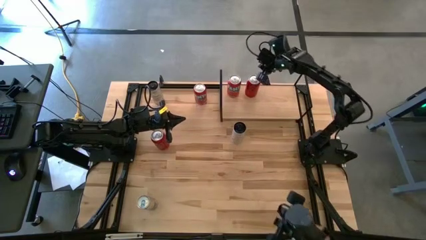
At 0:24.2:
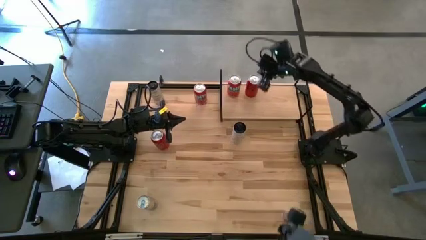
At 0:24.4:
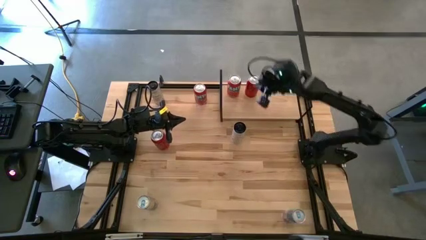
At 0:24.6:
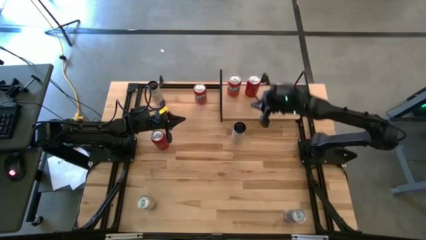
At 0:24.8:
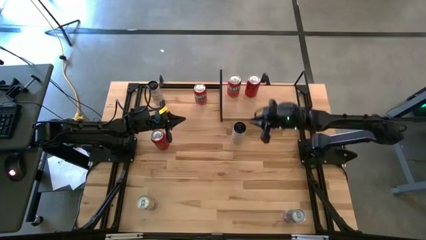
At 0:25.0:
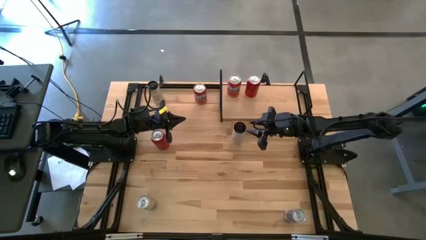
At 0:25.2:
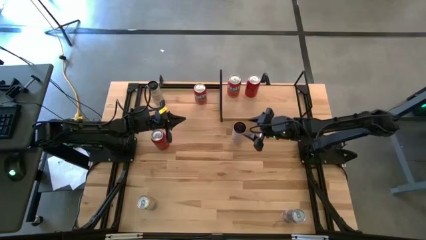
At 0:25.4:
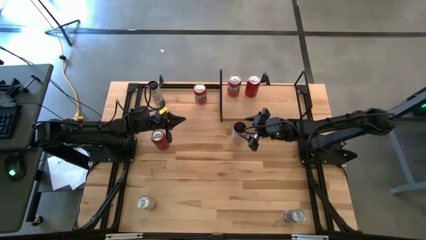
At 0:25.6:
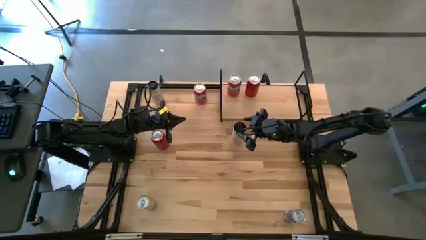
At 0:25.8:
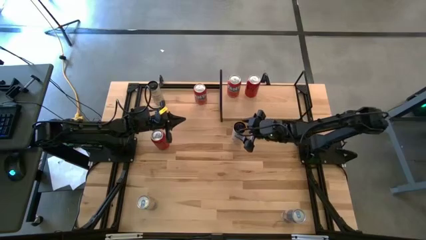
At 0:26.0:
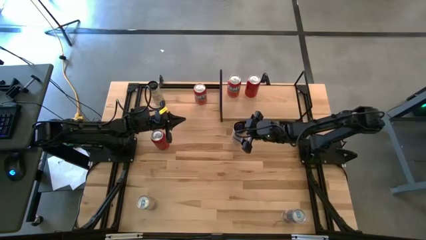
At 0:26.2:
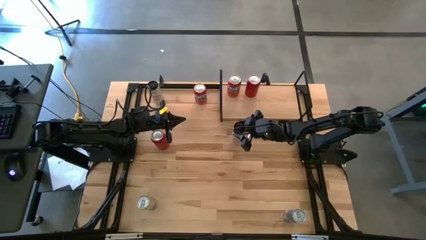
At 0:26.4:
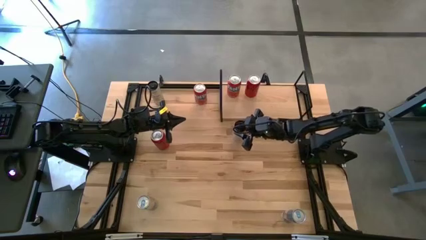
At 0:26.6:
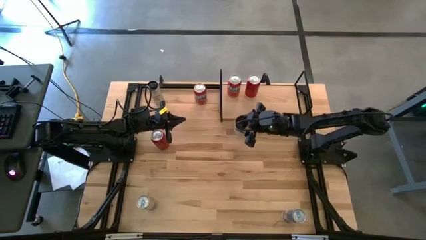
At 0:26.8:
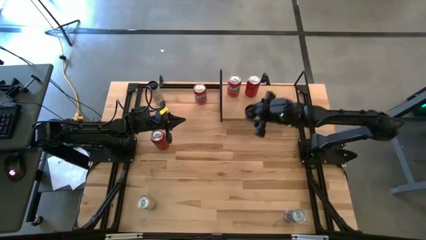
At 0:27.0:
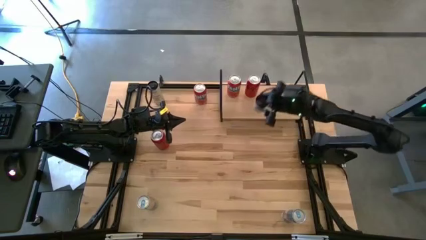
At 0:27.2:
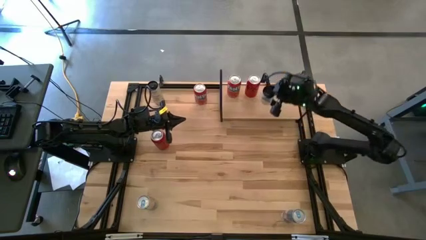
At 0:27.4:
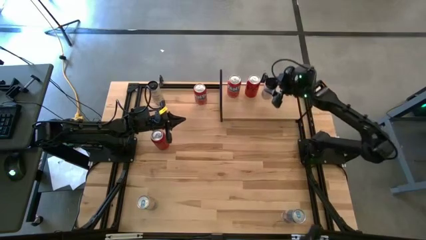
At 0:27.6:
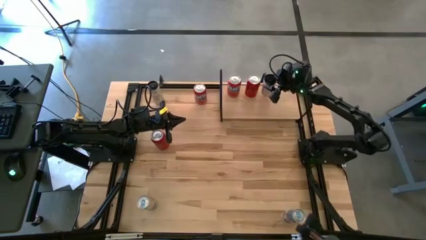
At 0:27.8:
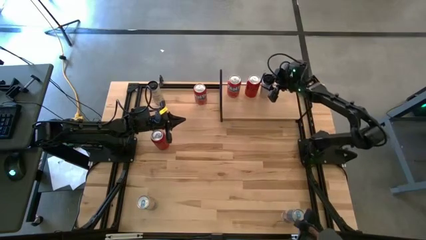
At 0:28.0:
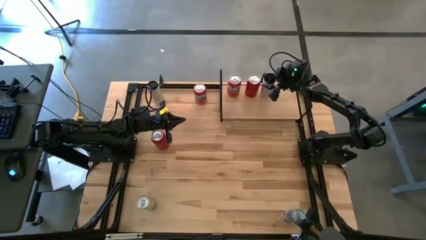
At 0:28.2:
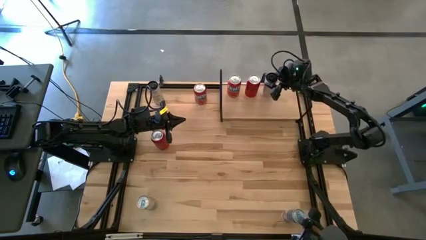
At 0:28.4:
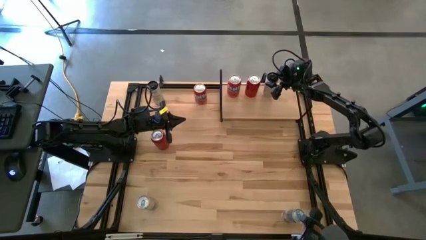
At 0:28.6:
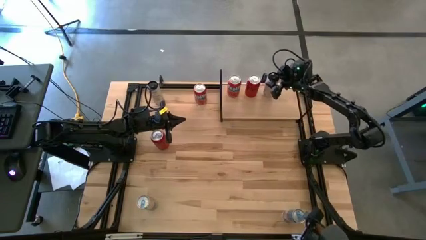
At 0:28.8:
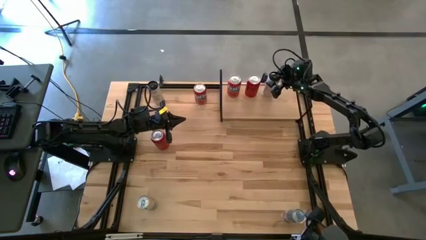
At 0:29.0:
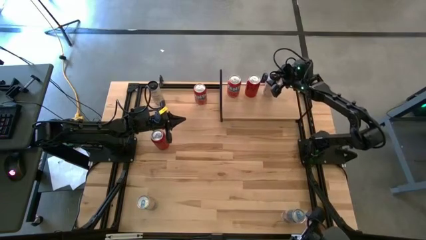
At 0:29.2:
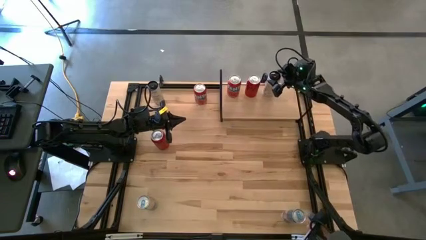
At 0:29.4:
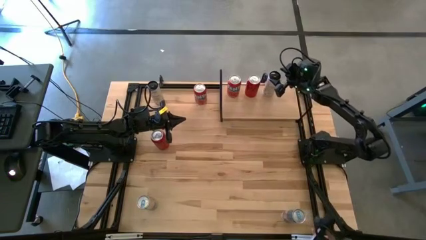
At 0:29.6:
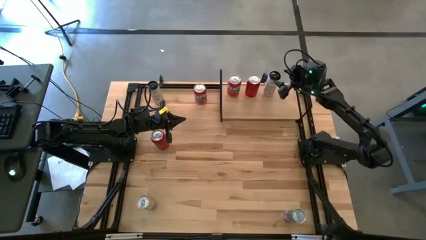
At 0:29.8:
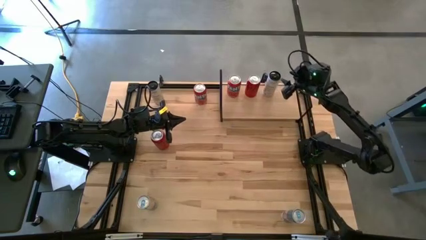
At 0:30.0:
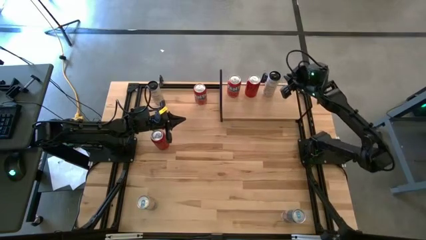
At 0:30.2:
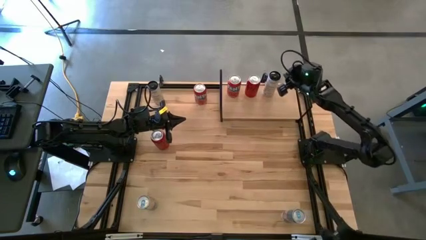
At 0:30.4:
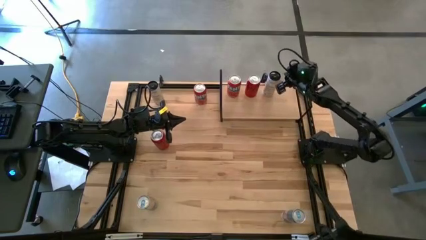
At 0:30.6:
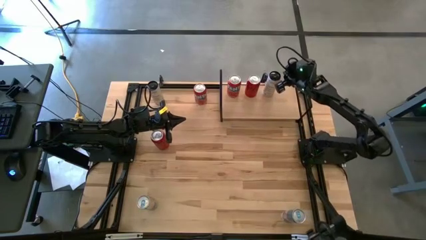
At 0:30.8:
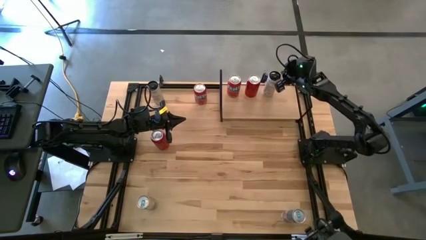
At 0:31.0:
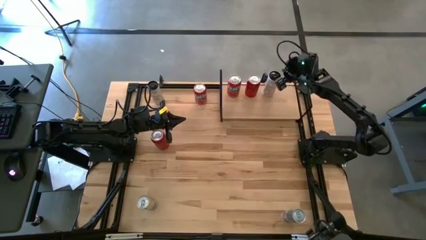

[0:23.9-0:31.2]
Task: Place canned beverage on shelf
Put the right white yellow soda can on the shelf

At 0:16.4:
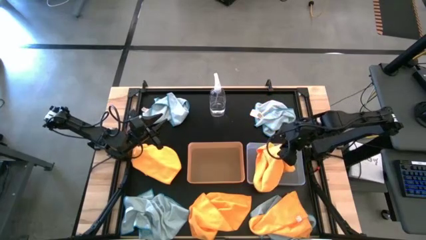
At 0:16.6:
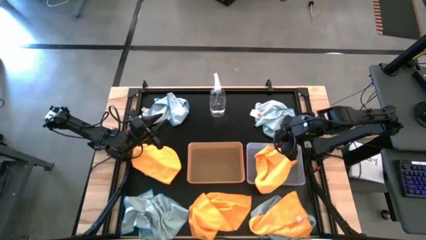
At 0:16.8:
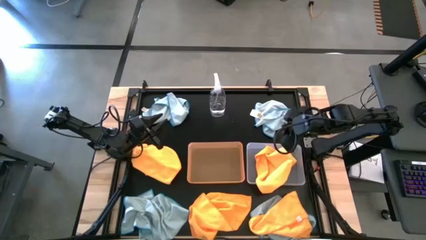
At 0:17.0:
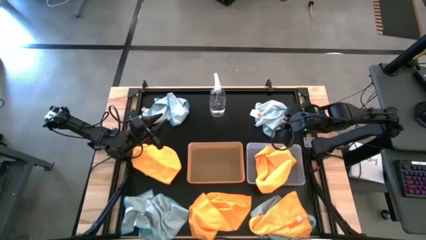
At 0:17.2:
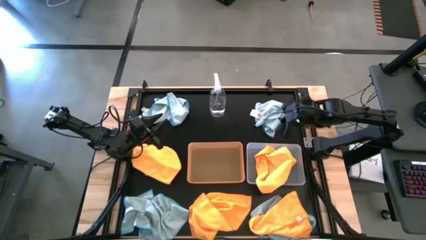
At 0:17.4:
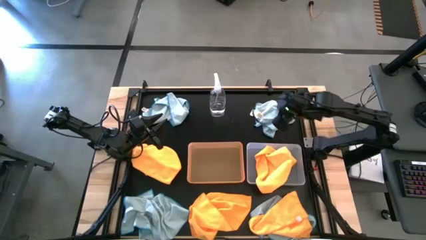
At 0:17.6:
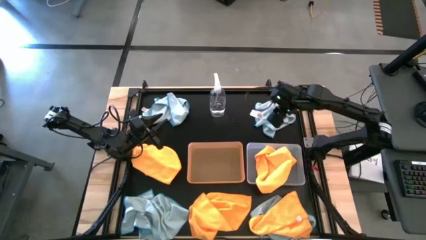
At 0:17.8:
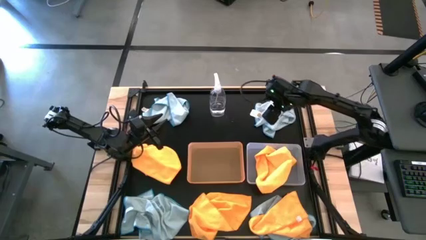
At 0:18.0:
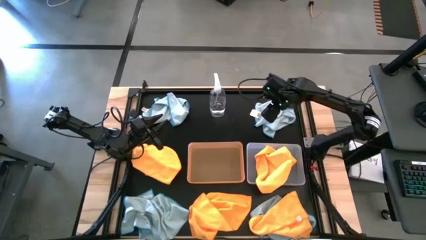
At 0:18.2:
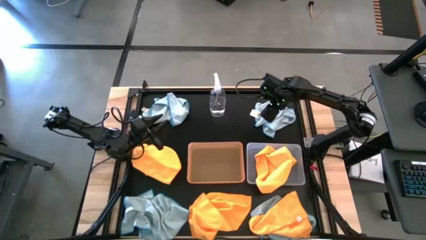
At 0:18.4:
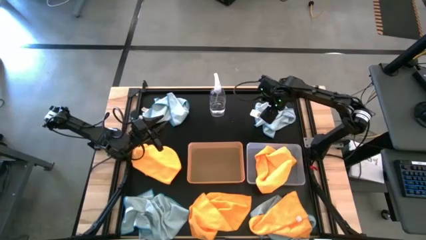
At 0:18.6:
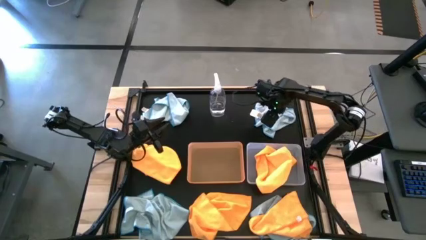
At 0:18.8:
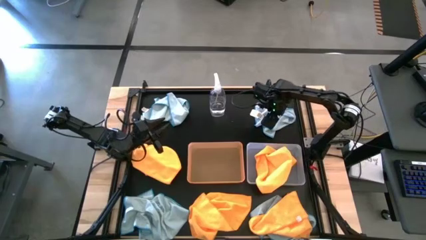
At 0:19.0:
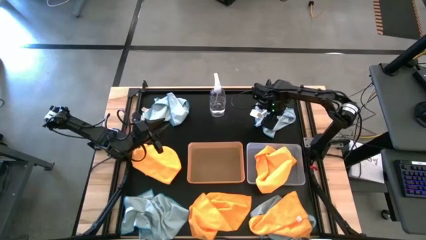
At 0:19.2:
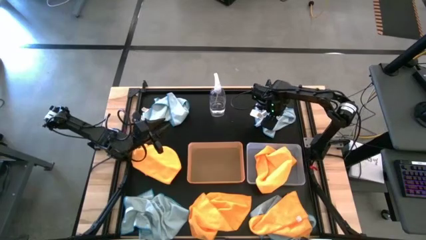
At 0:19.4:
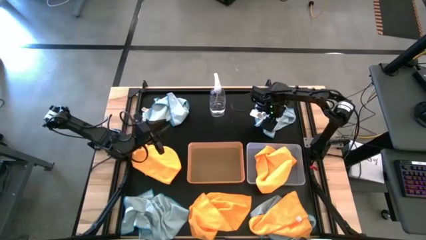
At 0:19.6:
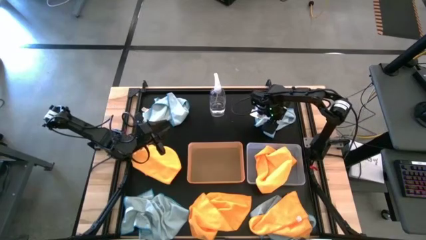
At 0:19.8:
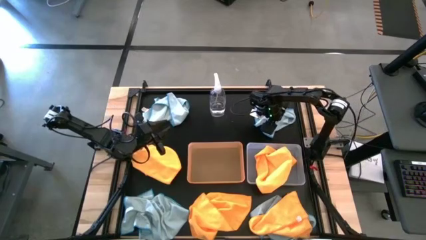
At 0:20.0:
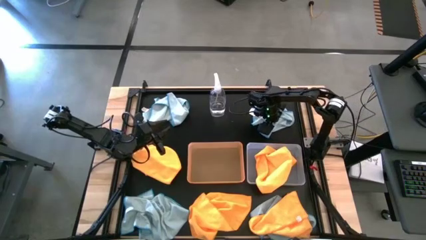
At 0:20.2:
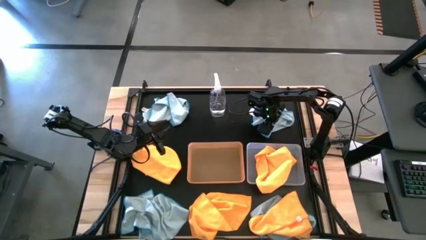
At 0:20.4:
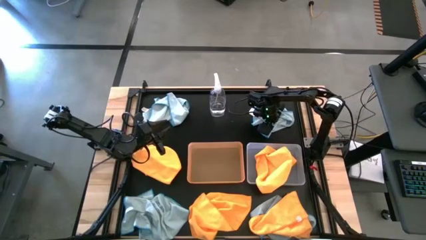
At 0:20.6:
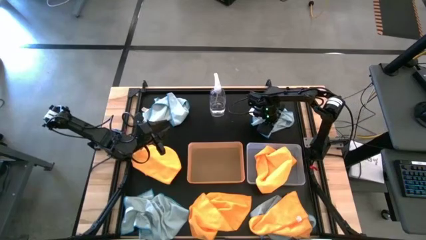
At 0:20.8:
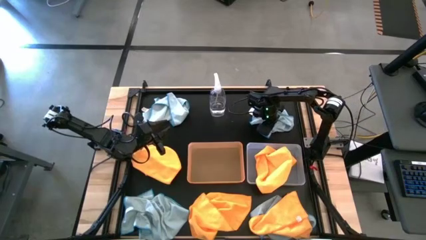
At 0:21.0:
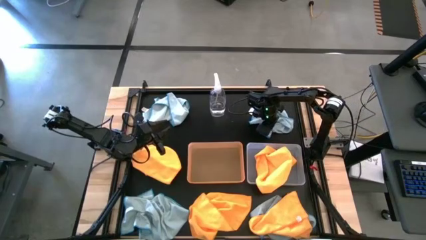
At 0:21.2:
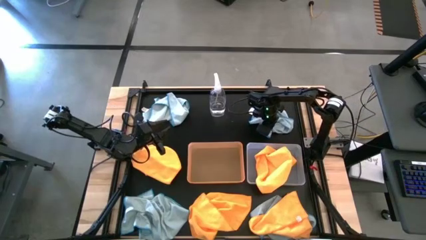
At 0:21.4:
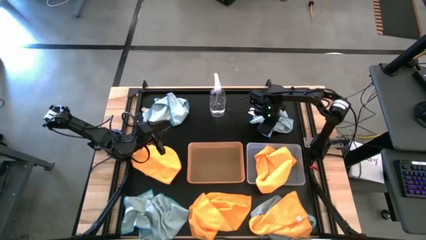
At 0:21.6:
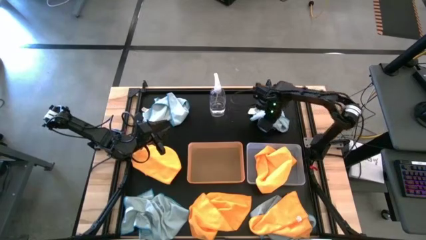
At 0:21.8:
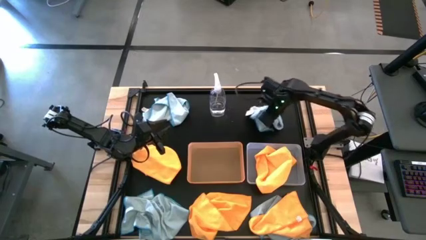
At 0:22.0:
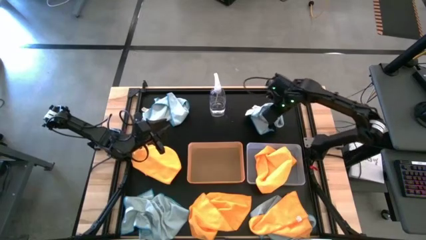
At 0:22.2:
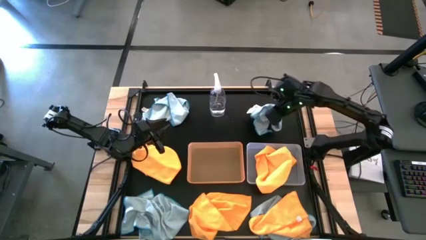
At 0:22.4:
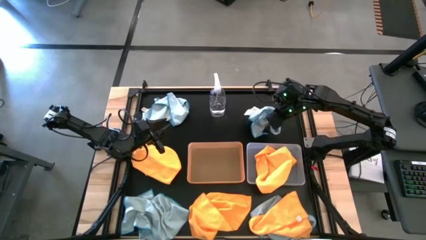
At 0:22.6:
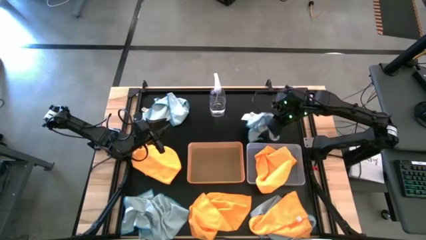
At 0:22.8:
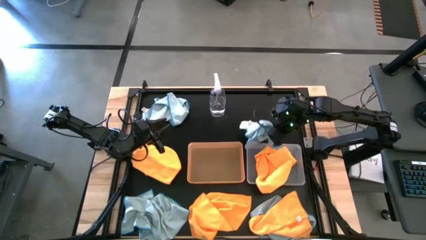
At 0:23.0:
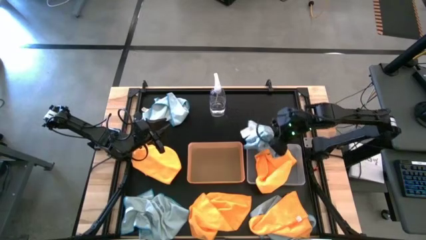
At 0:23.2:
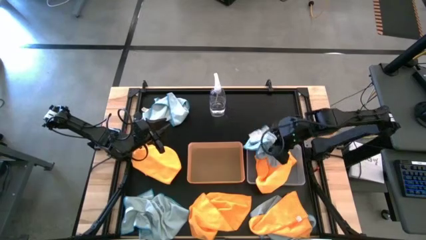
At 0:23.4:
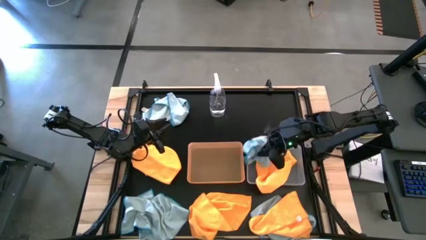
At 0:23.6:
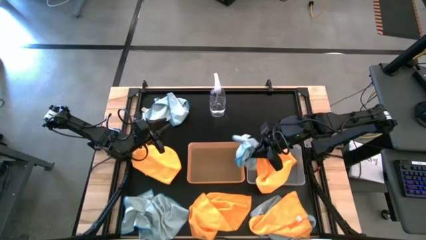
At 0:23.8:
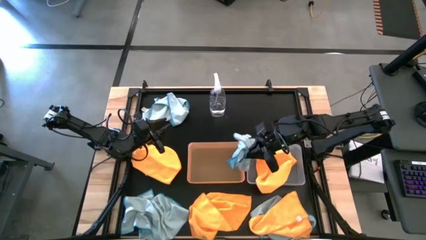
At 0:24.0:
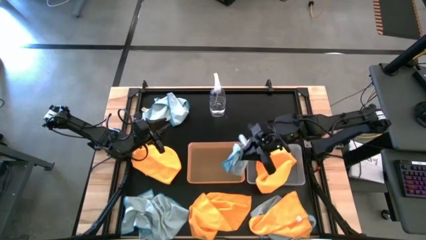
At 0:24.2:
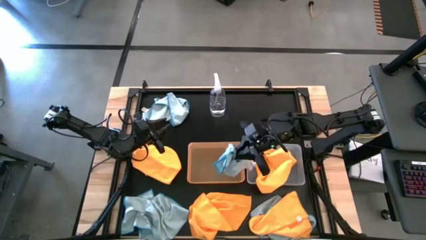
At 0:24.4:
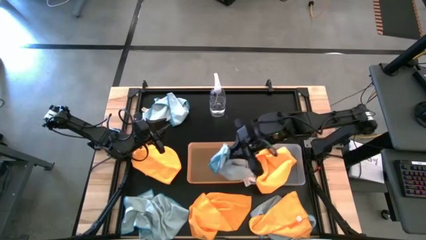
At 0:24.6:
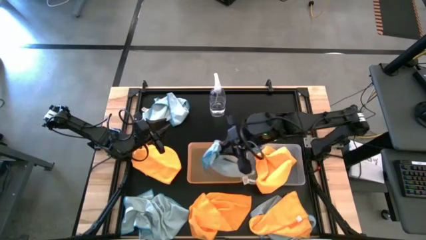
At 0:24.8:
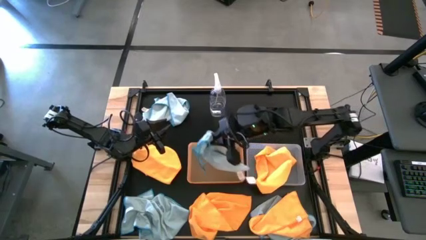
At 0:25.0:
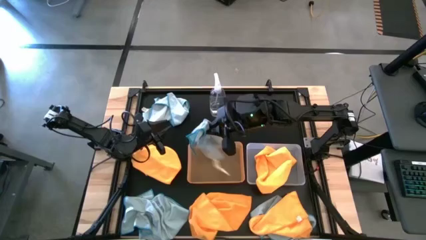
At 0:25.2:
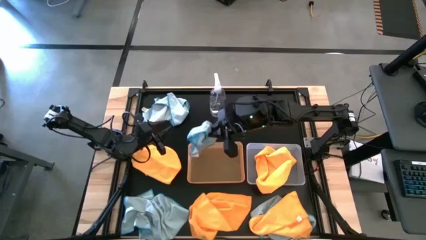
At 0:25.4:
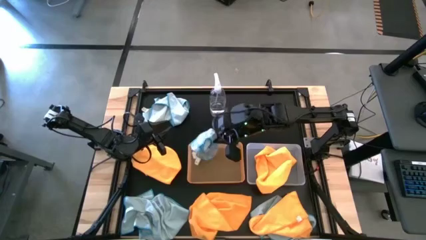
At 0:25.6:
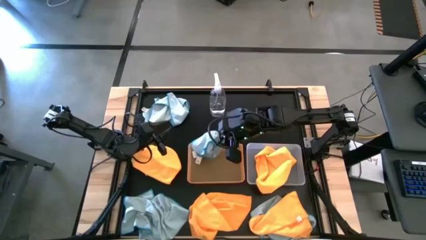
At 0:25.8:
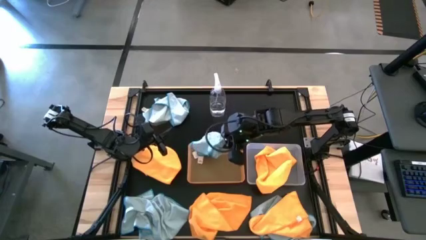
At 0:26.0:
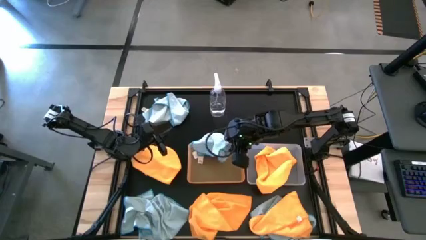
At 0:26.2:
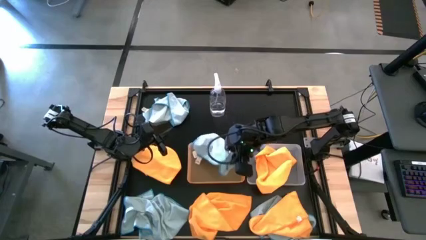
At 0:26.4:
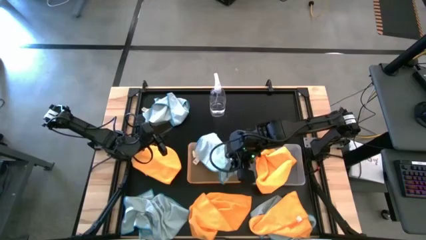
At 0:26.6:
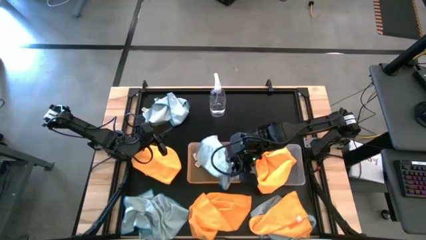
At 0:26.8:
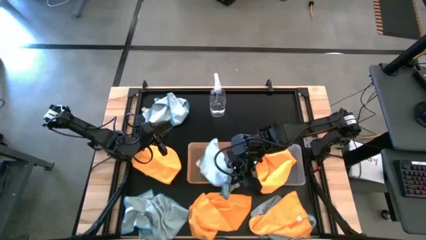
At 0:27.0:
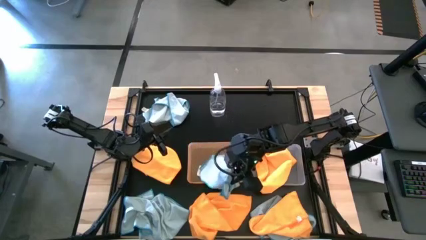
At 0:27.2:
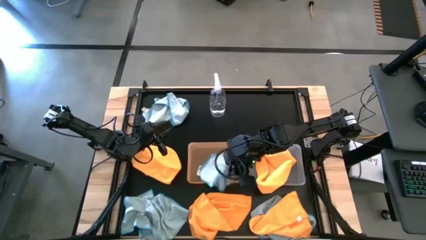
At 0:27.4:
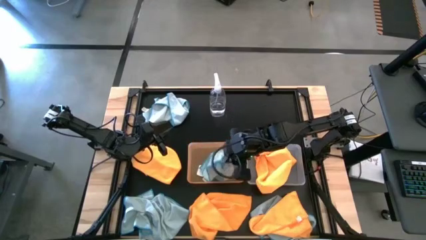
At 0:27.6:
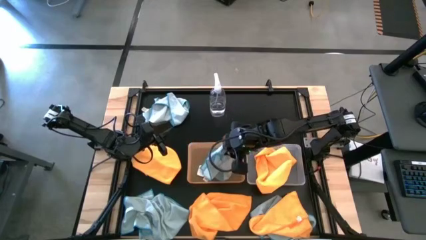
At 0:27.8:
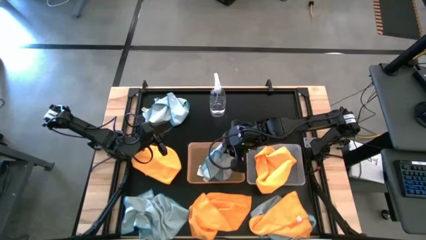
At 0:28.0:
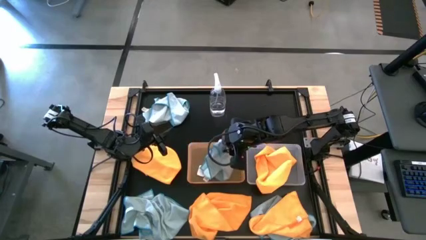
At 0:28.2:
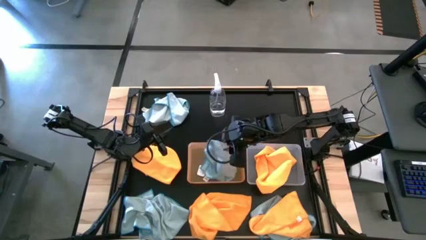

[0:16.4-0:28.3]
Task: Sort microfiber towel by color & place in baskets
Put the blue towel into the orange bin
